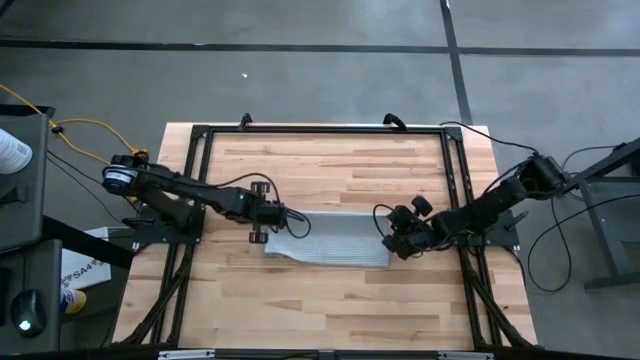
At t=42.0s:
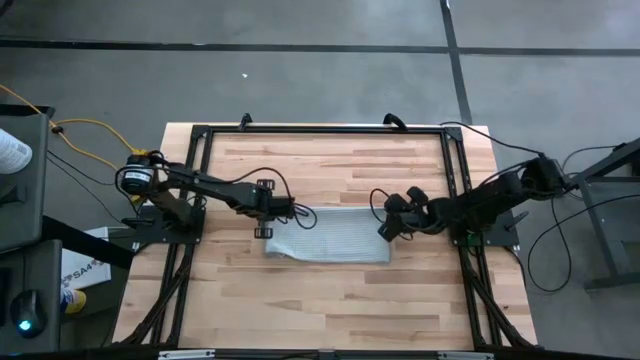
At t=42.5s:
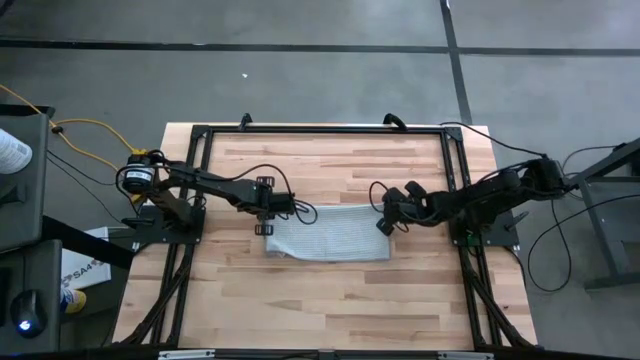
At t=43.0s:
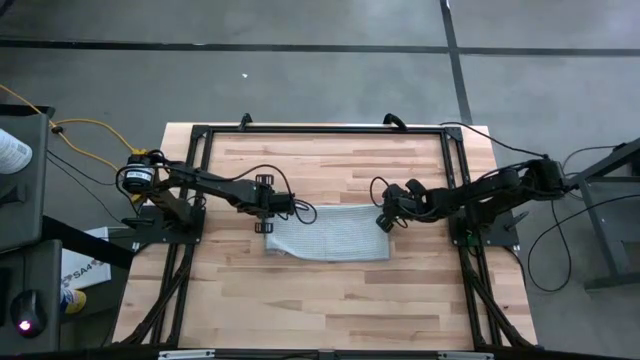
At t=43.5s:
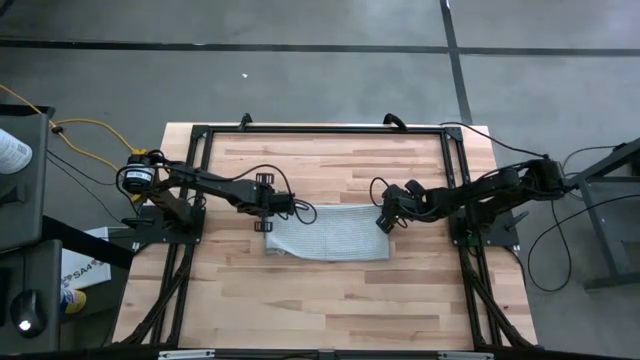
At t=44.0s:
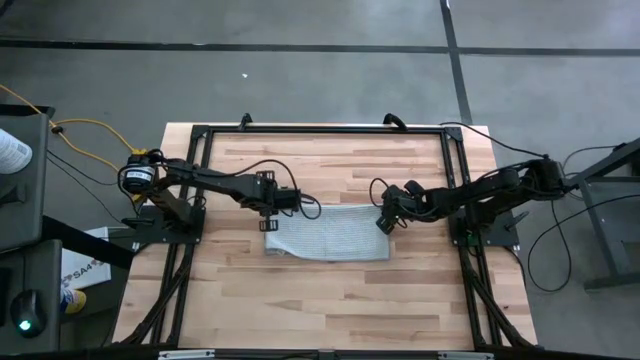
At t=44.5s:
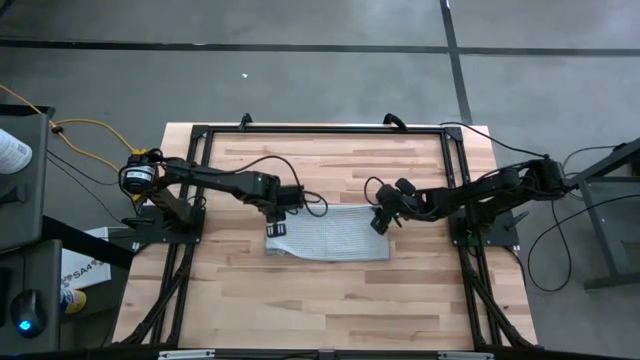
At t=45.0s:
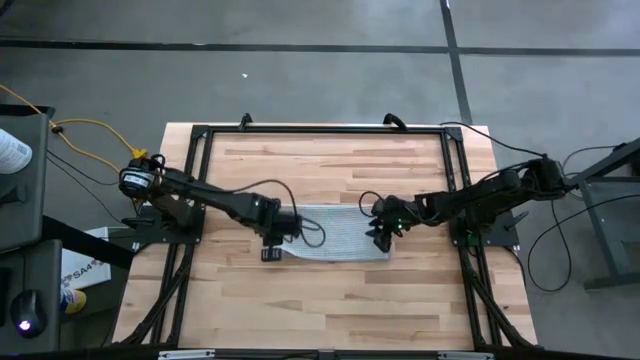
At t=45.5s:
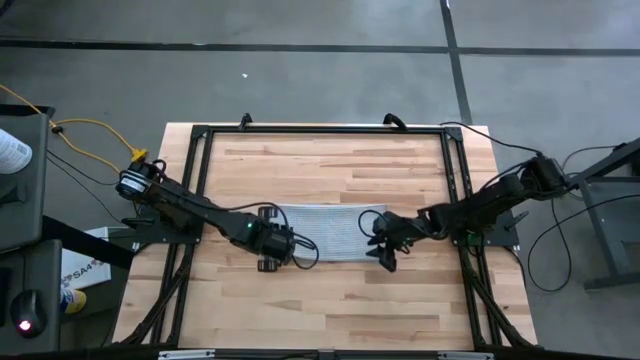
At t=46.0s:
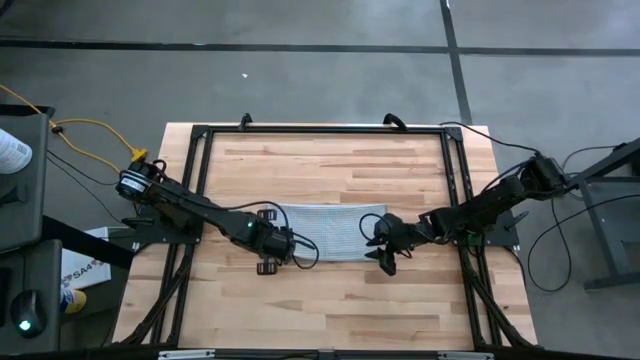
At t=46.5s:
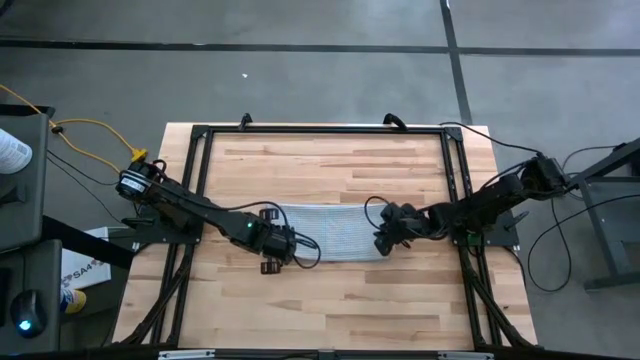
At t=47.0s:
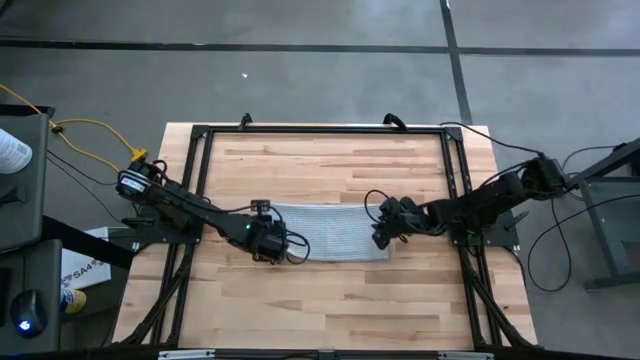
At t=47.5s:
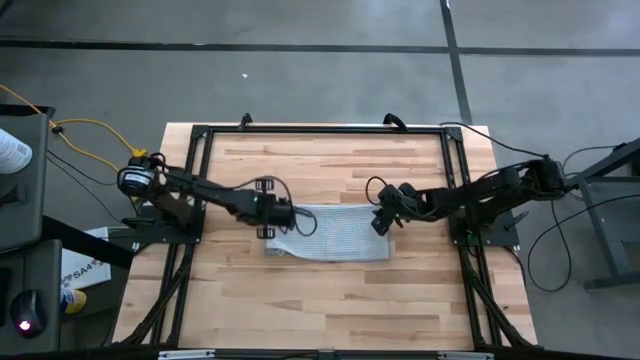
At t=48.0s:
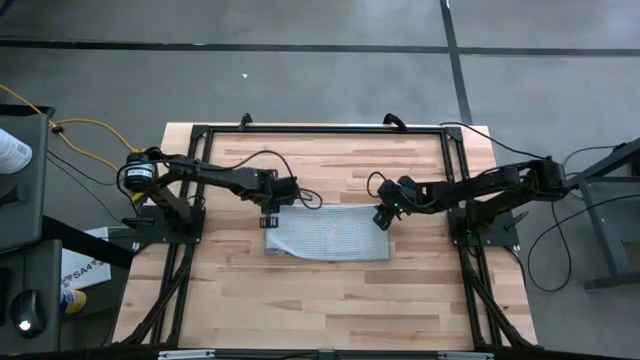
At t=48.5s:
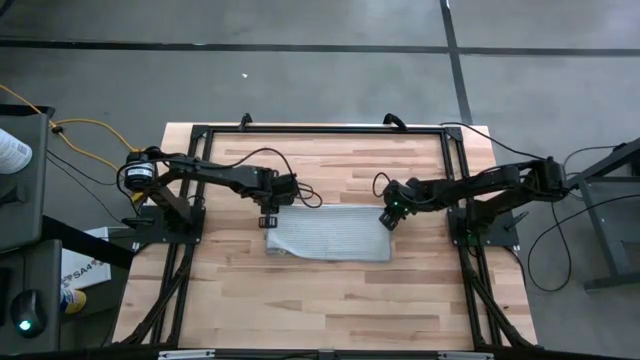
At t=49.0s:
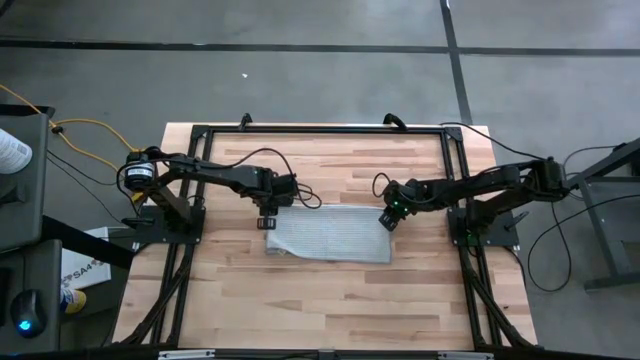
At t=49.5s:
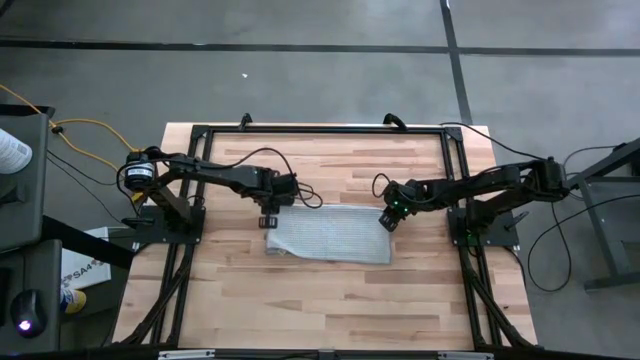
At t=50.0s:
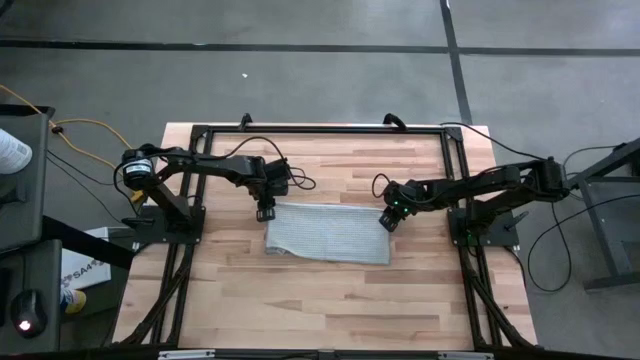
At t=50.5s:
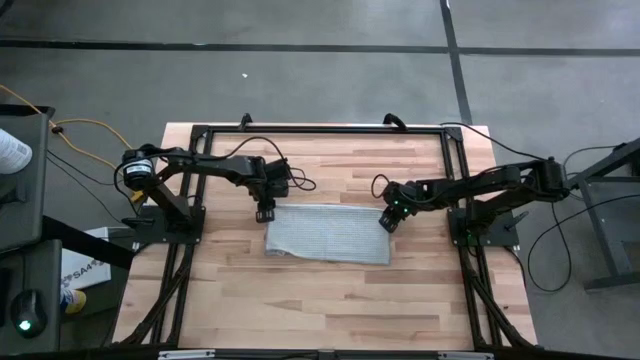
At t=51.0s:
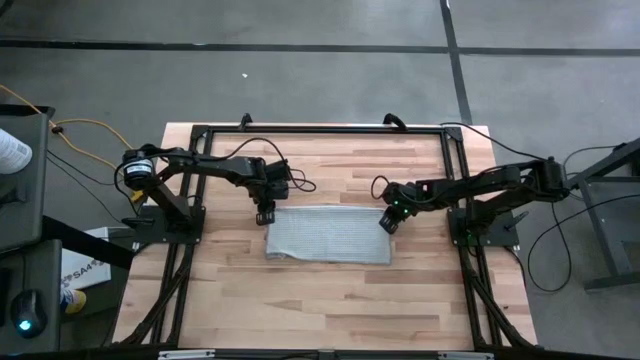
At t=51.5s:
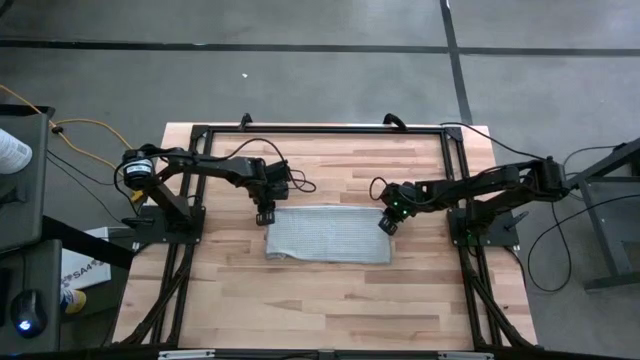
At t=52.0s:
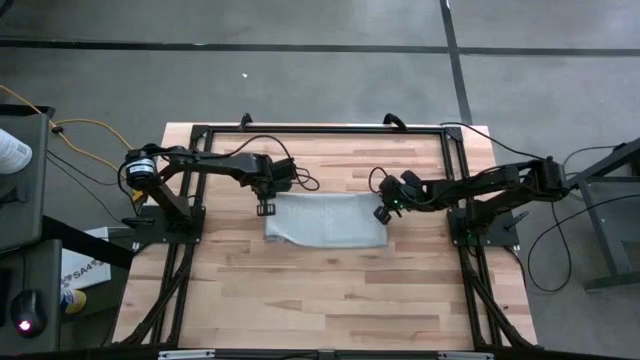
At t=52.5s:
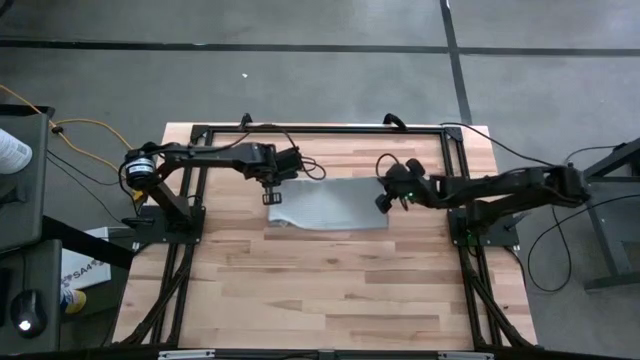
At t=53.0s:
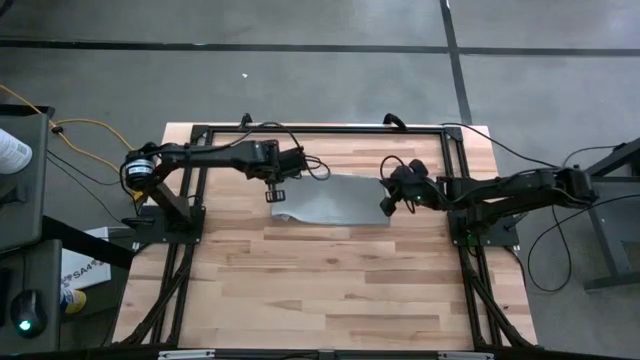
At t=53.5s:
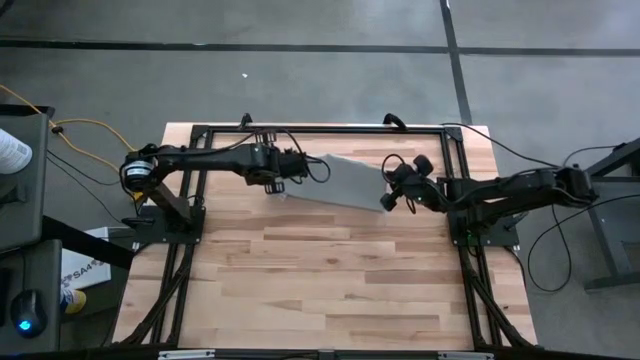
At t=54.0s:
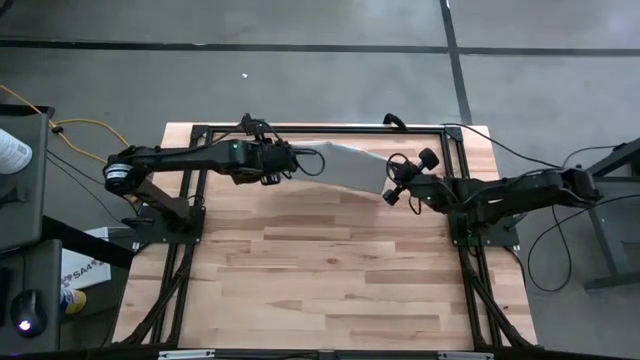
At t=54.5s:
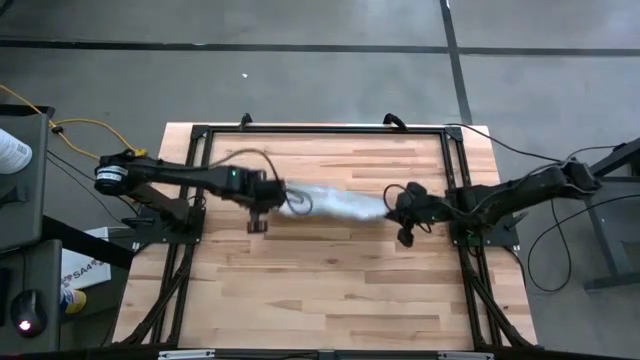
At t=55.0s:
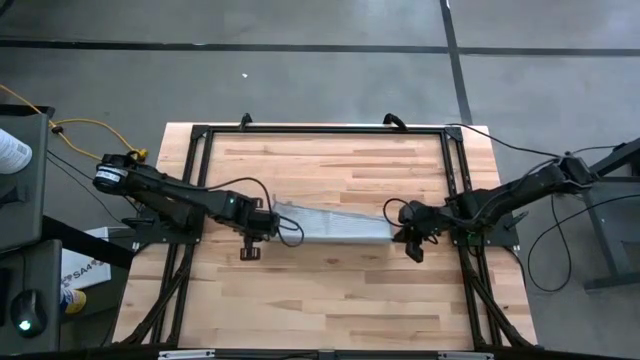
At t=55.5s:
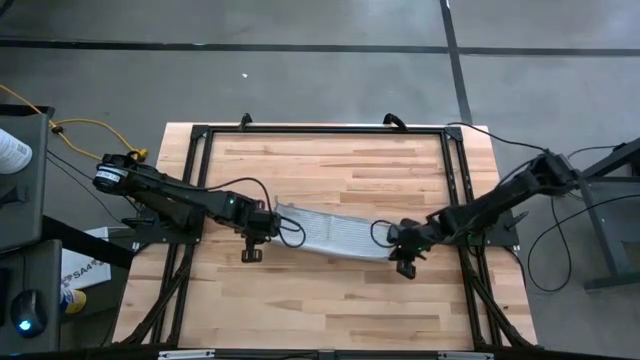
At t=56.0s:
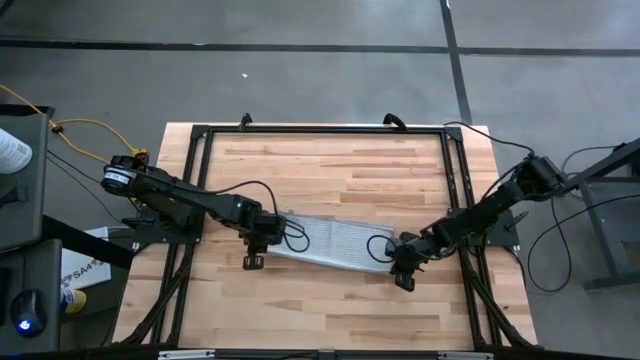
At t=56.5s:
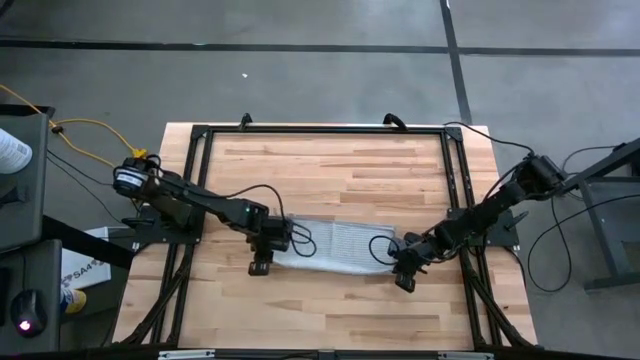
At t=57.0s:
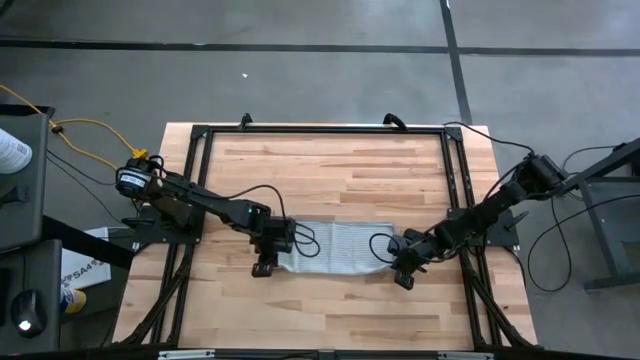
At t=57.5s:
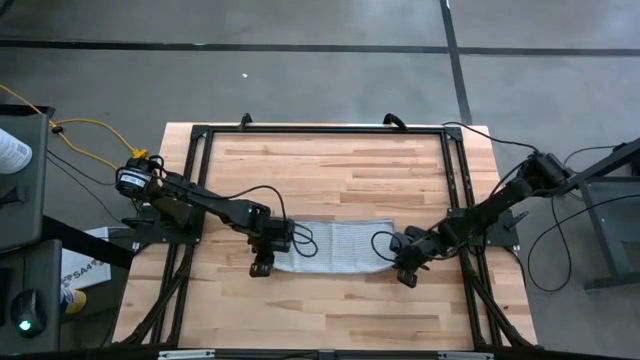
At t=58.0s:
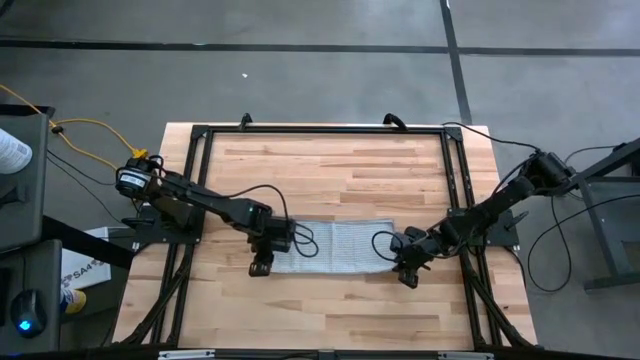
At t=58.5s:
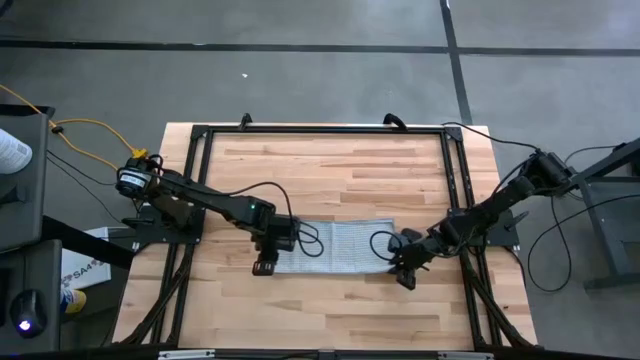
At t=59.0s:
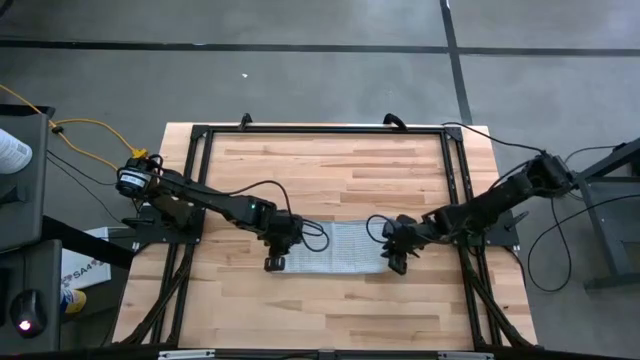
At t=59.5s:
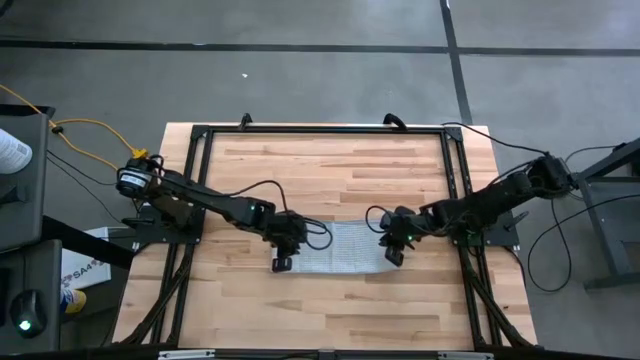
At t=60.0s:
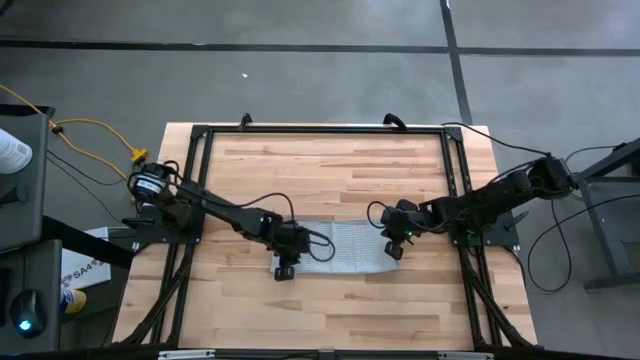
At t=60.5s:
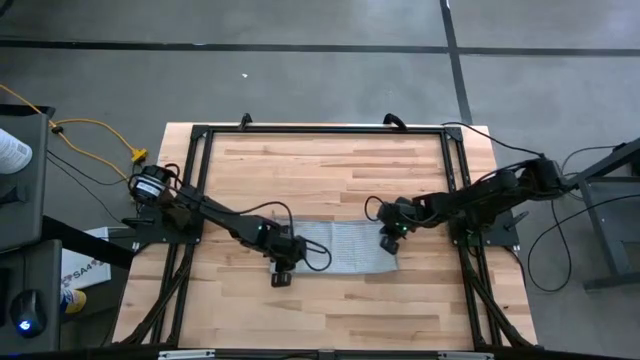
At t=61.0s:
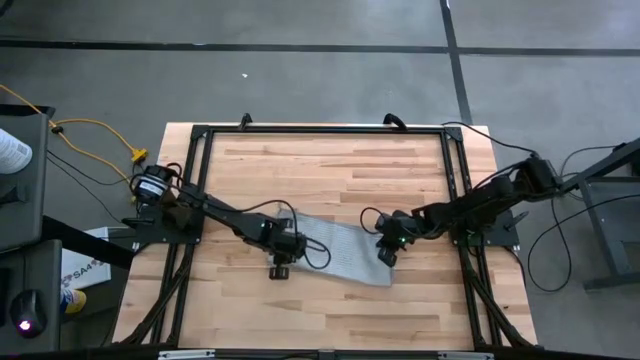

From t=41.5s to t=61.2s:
Task: Fold microfiber towels
Fold the grey towel

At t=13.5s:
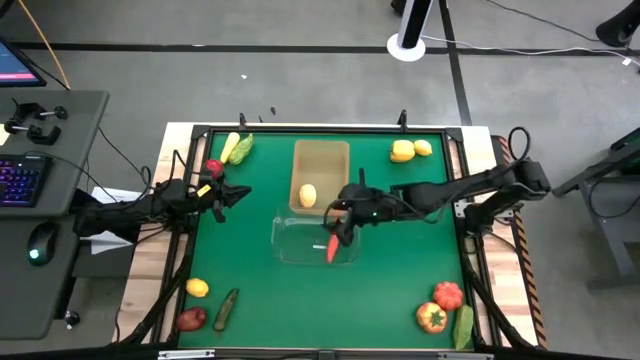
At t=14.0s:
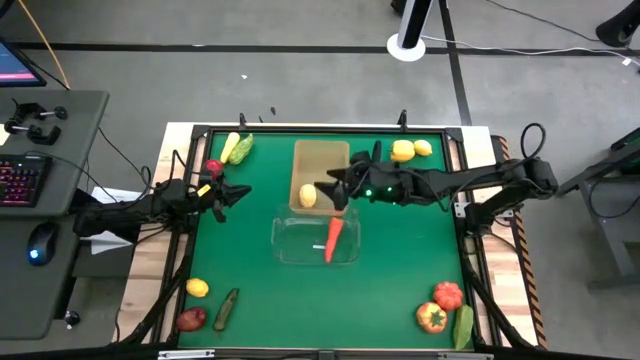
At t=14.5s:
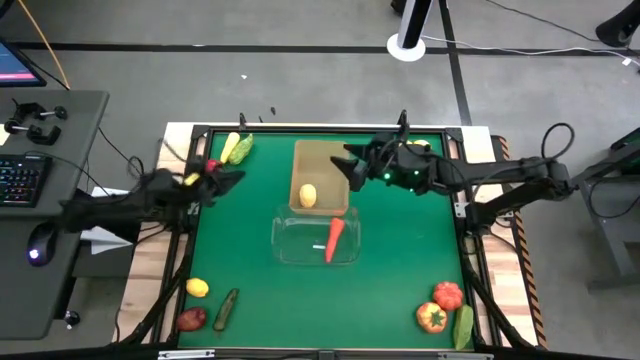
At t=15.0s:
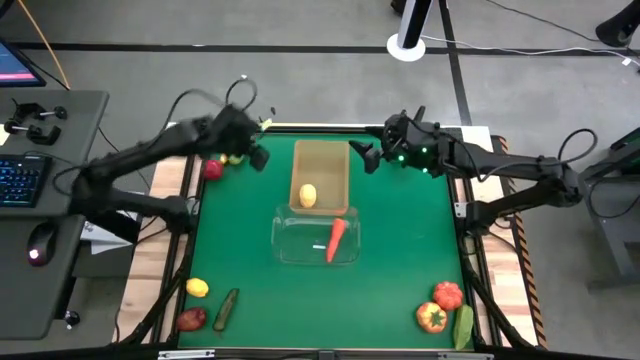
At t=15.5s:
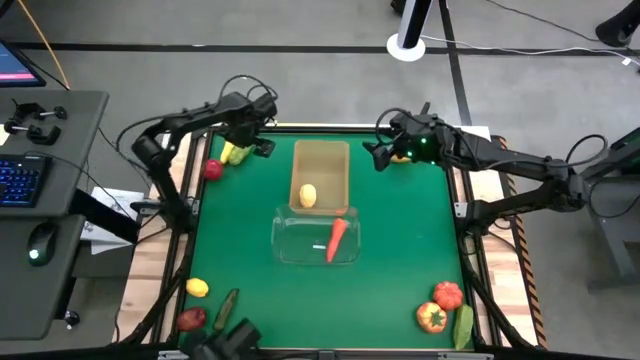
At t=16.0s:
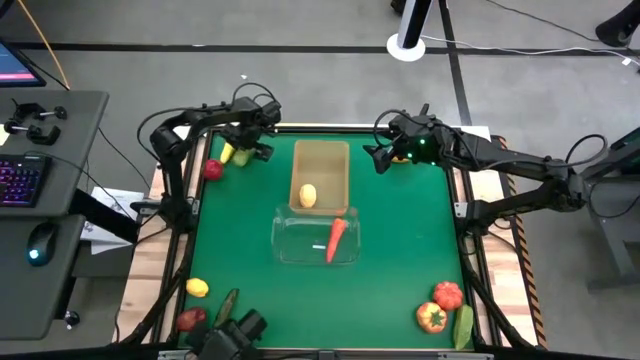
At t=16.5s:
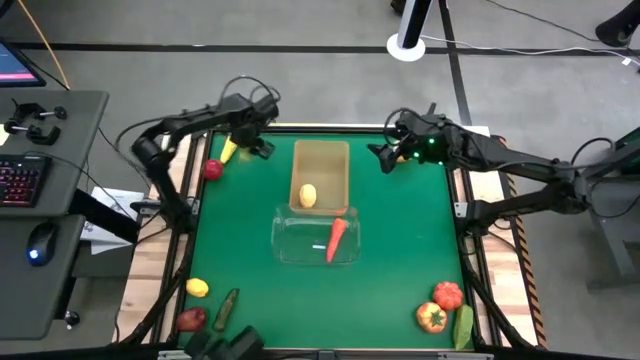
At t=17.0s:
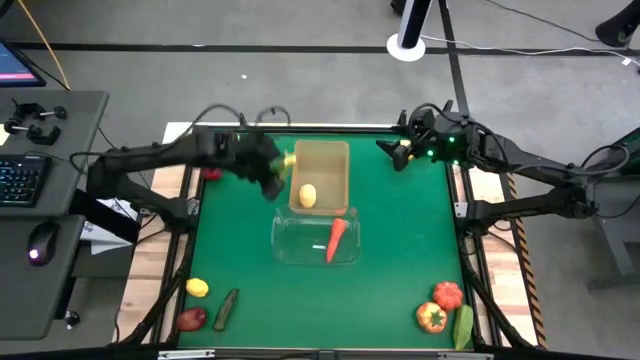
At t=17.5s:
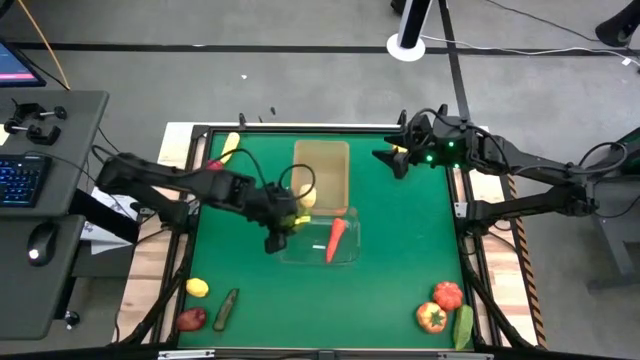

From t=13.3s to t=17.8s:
Task: Sort produce into baskets
Put the top green cucumber into the transparent bin
